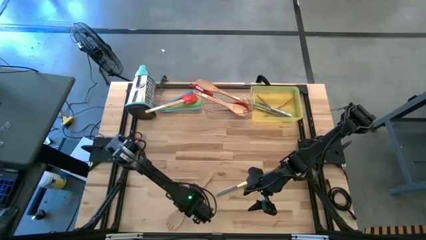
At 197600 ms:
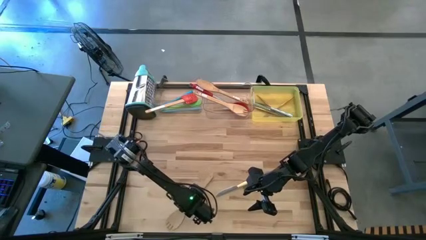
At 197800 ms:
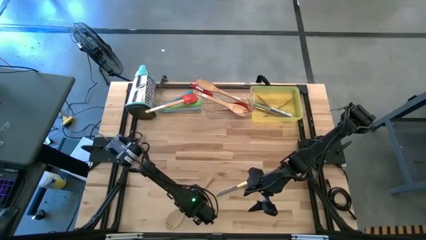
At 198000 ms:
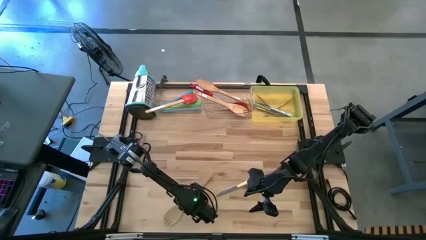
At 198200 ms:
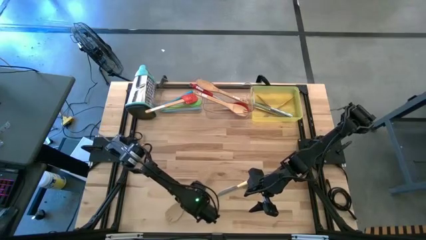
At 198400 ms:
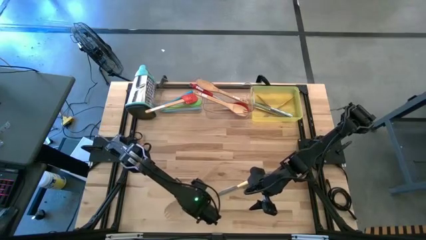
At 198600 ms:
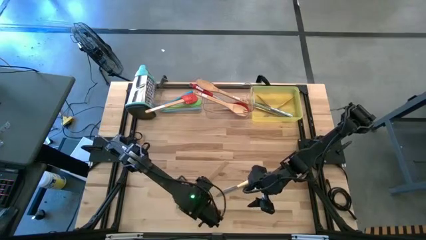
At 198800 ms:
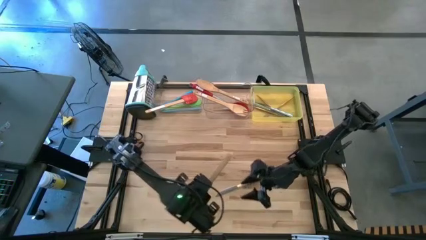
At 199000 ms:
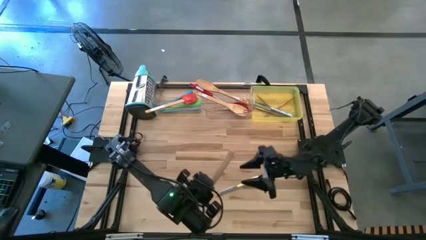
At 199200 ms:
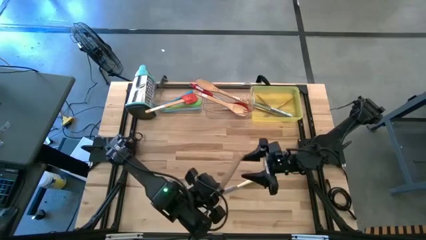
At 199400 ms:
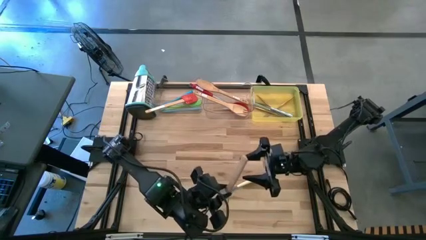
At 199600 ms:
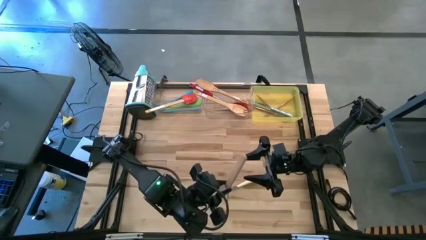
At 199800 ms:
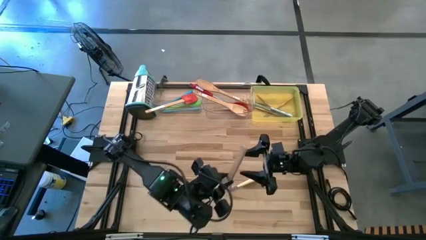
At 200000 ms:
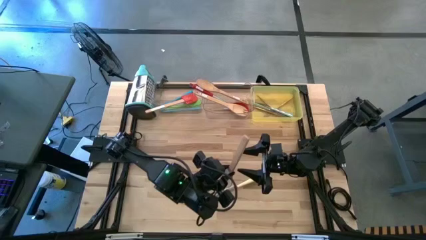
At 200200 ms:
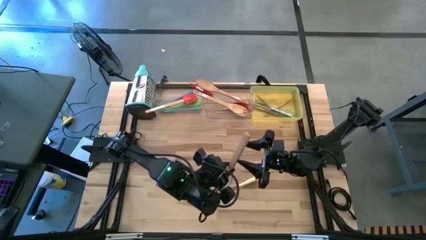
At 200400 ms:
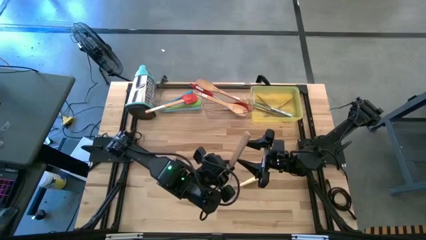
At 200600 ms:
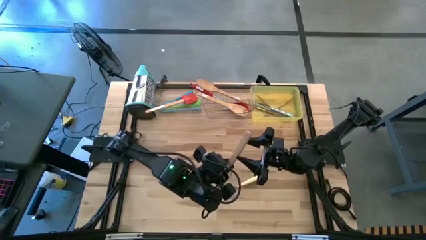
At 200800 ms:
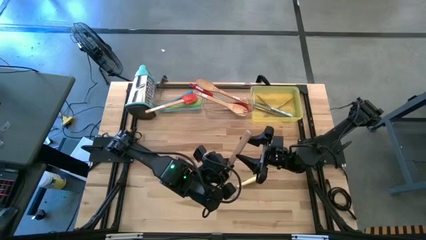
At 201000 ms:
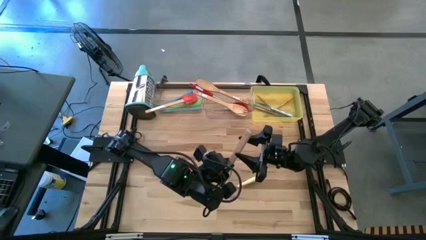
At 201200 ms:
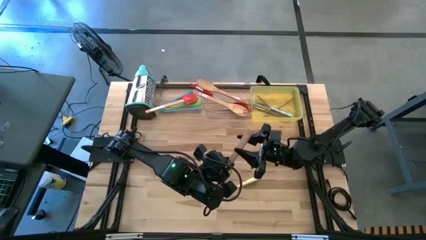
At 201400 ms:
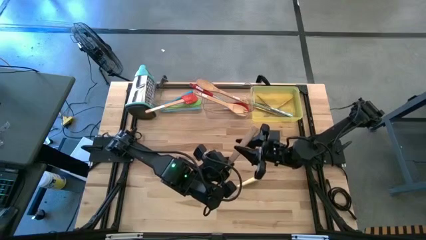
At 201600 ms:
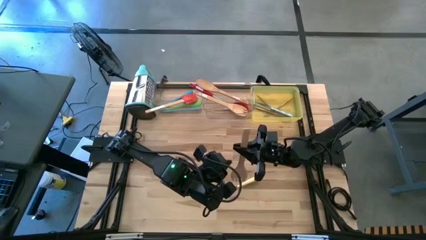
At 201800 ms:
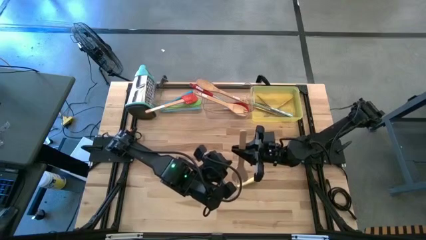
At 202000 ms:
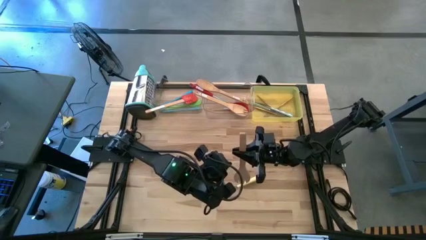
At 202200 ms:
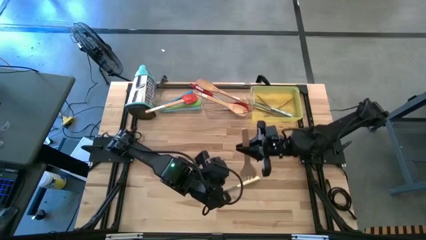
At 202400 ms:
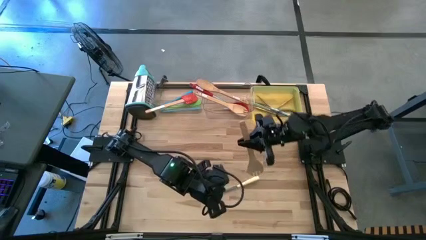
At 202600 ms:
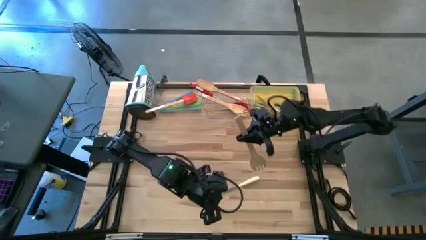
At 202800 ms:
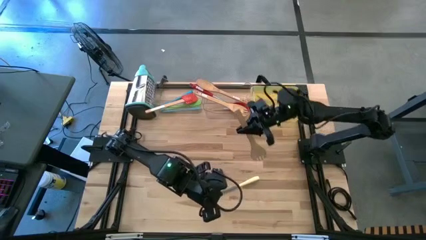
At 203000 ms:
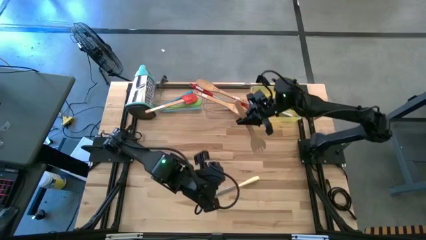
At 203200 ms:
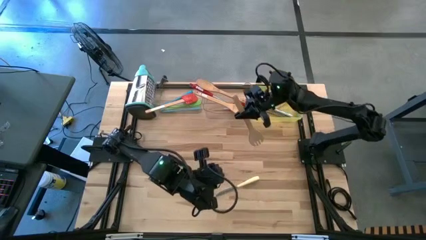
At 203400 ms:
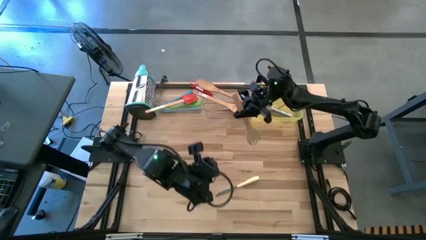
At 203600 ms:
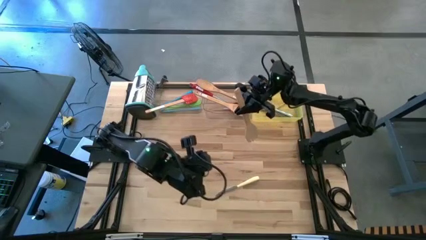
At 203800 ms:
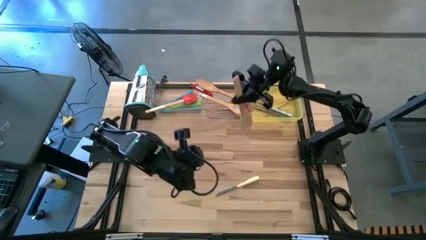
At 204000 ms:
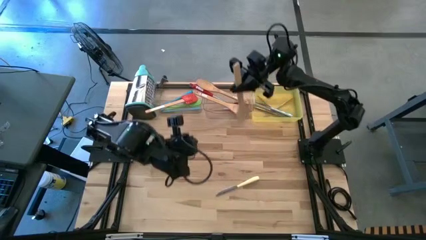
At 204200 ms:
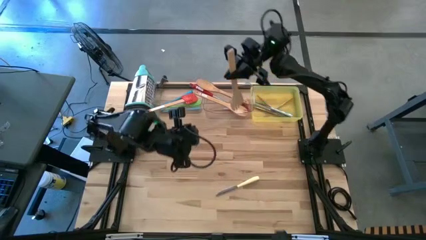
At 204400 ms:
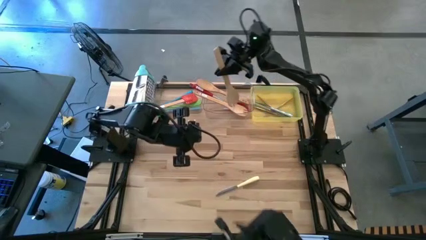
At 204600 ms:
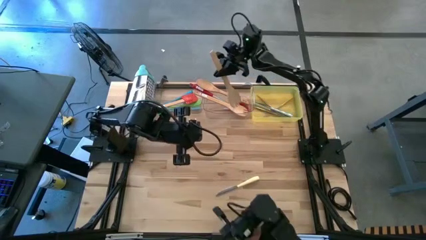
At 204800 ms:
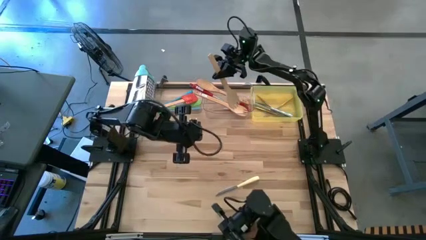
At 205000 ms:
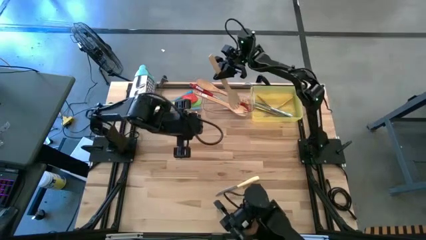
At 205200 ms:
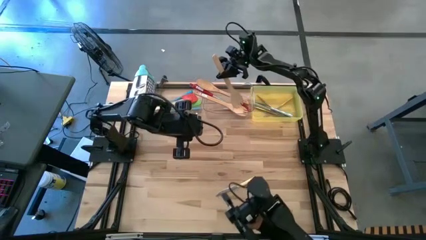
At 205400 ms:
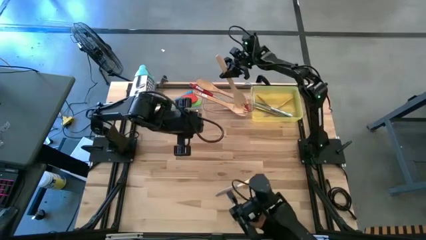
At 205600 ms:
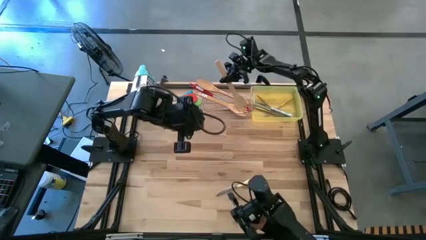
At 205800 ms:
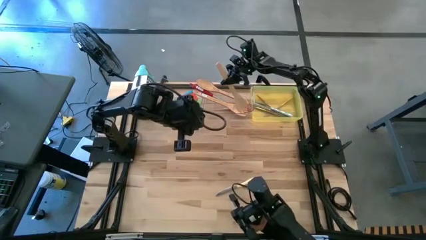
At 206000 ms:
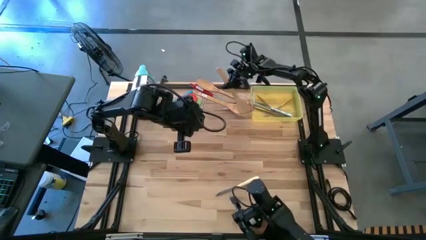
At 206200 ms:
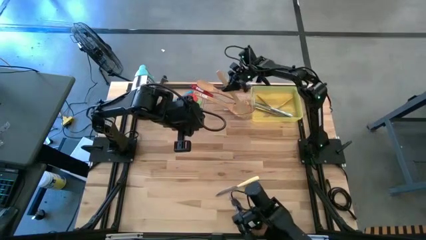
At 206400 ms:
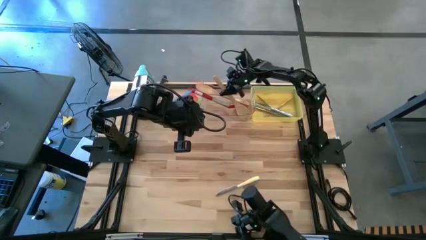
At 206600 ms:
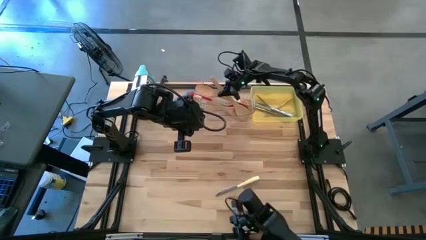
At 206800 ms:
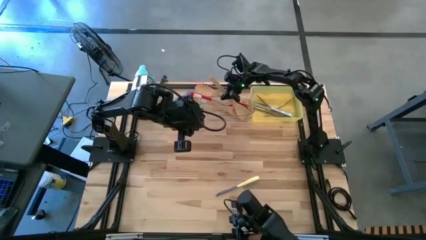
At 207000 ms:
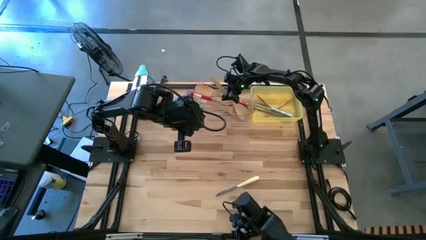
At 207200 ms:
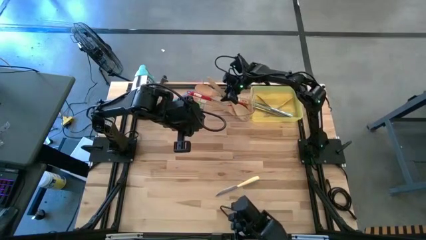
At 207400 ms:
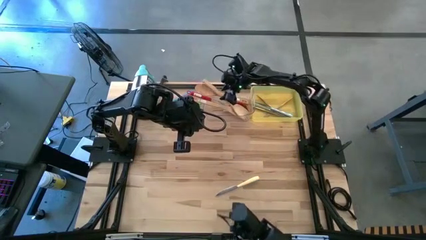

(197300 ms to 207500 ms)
Task: Pick & Place Kitchen Items
Put the brown serving spork into the right transparent bin

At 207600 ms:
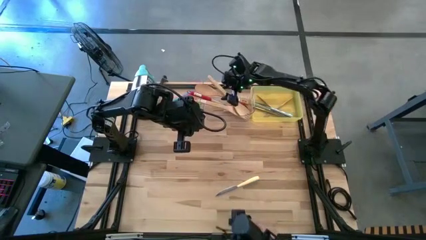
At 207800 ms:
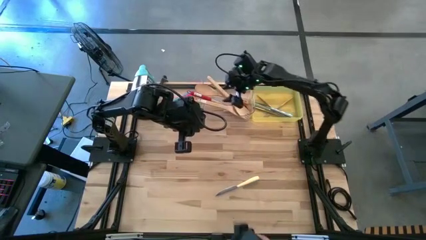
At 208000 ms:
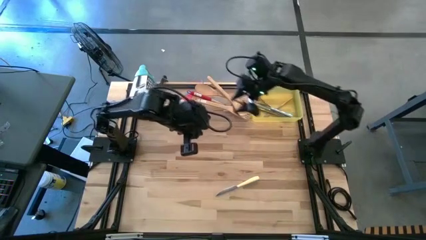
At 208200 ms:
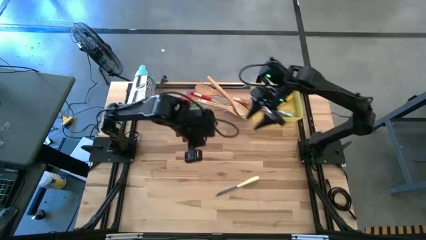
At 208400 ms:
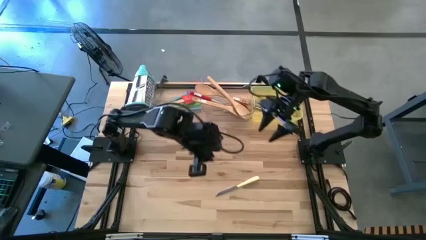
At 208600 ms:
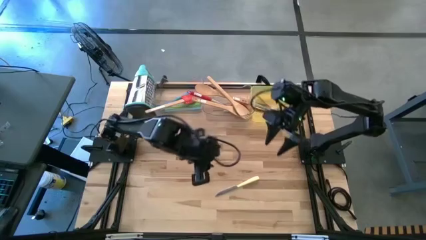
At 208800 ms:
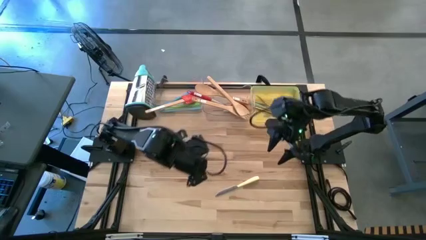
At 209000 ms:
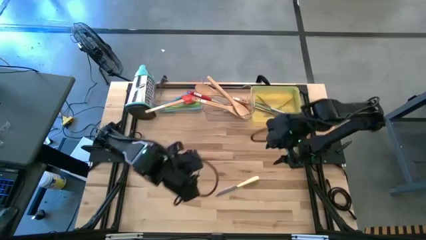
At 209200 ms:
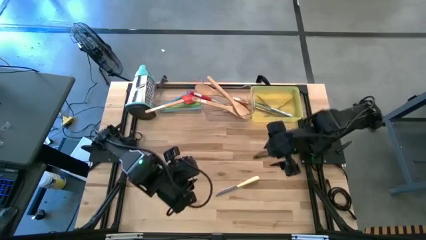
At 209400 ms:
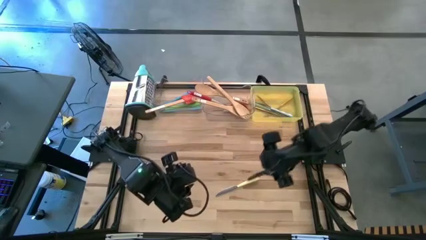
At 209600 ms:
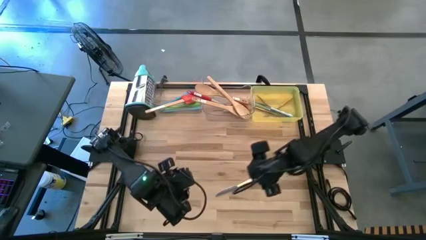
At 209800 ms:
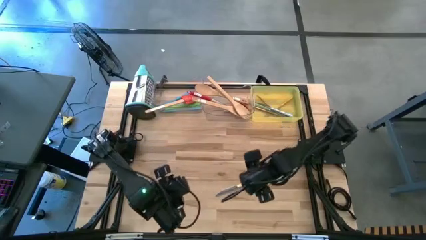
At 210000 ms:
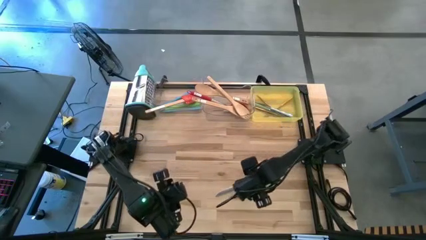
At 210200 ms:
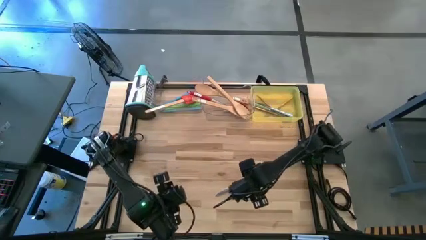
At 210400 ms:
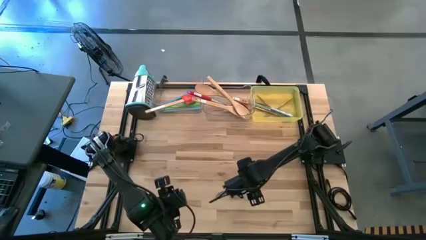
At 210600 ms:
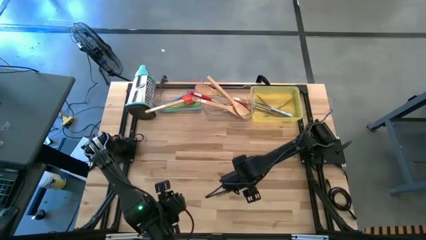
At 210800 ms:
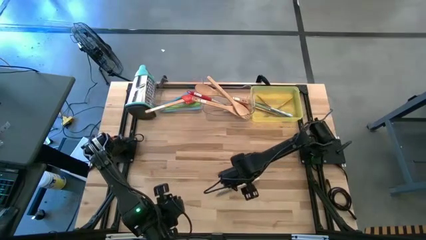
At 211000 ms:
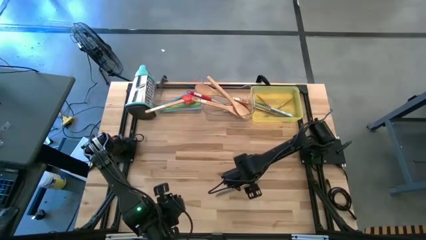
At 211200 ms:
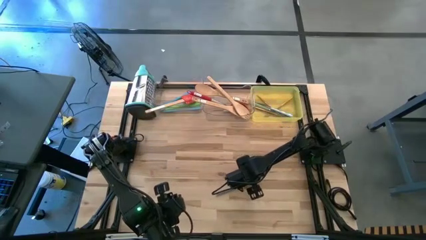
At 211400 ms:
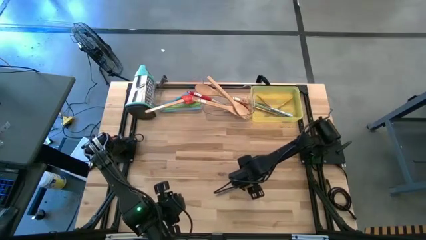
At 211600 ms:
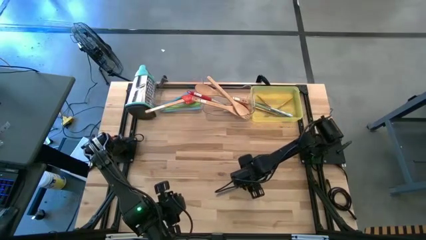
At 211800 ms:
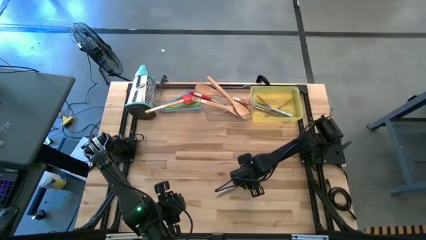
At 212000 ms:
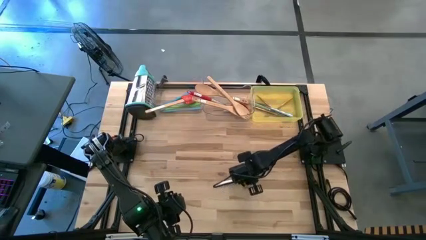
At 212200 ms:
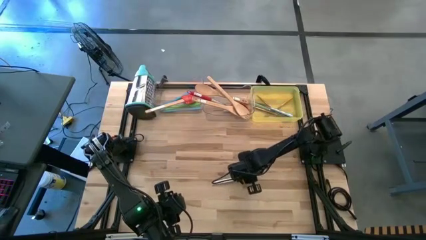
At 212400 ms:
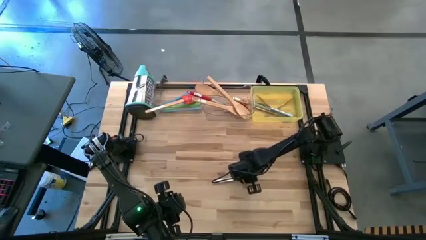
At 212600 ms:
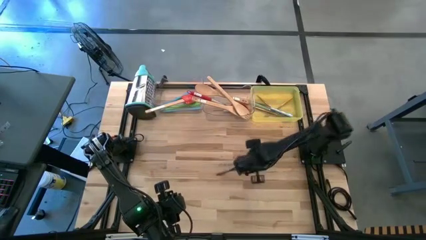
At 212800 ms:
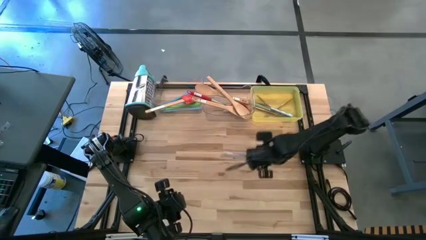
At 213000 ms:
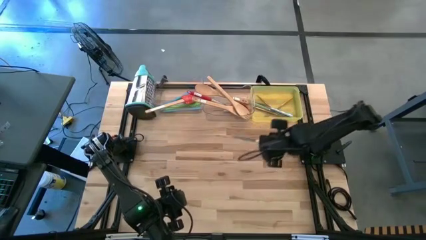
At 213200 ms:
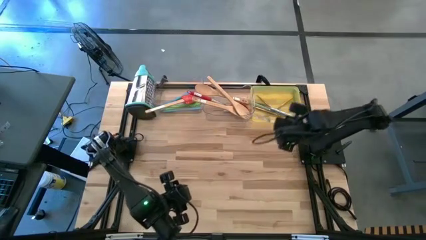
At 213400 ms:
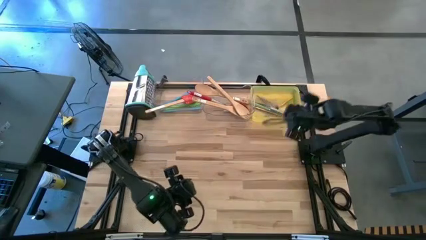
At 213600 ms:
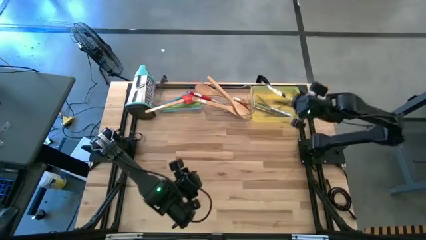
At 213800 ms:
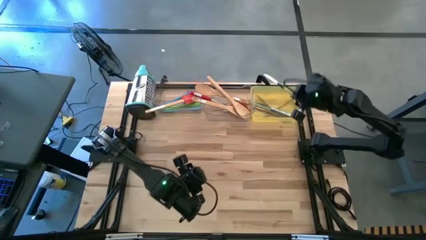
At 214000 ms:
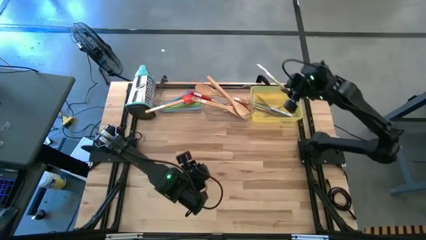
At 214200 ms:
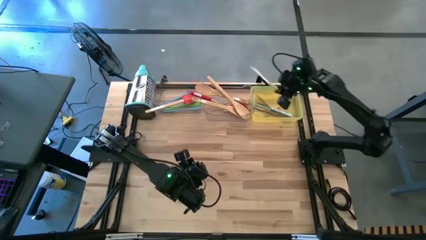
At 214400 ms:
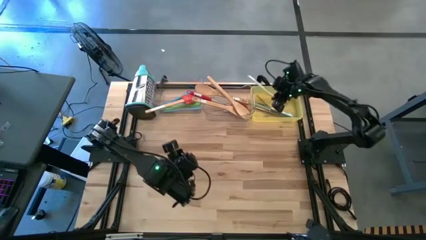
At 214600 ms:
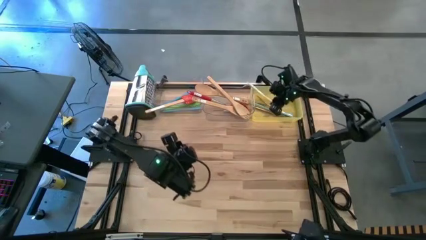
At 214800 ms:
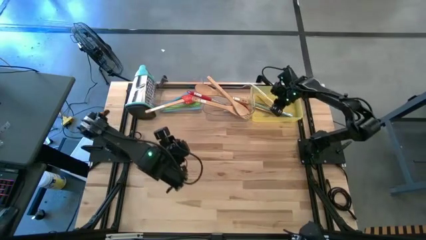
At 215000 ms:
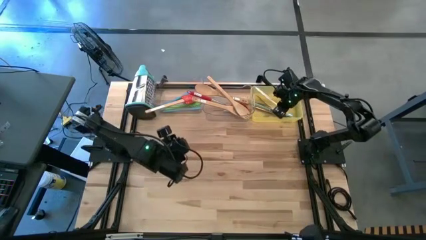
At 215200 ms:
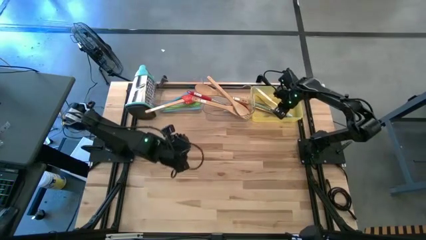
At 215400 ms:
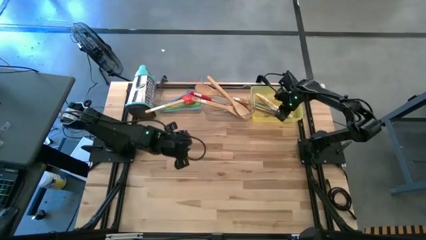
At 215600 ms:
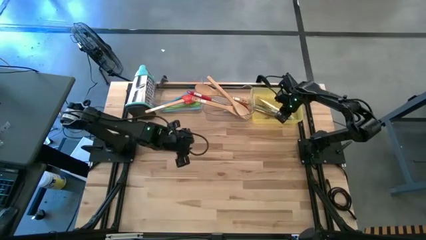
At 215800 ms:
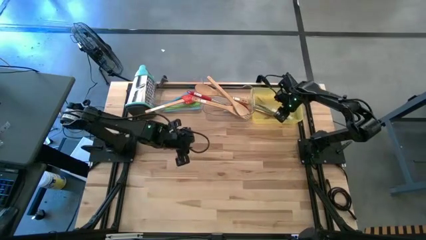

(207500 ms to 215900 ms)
Put the yellow knife into the yellow bin
